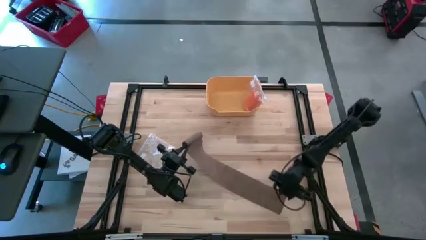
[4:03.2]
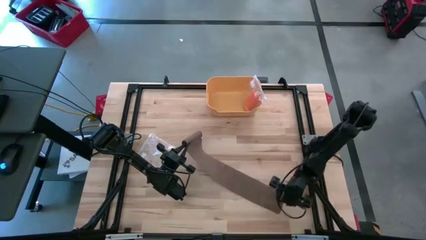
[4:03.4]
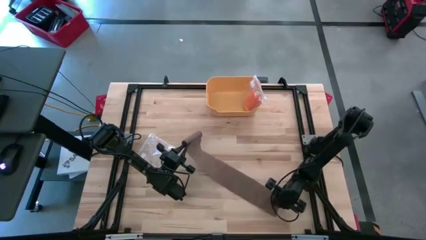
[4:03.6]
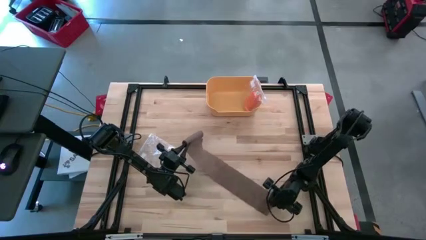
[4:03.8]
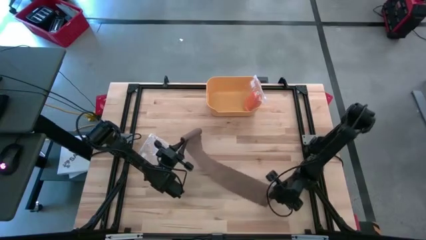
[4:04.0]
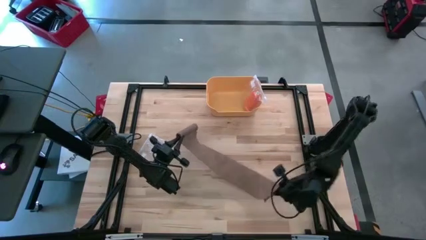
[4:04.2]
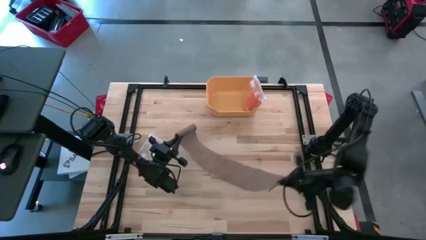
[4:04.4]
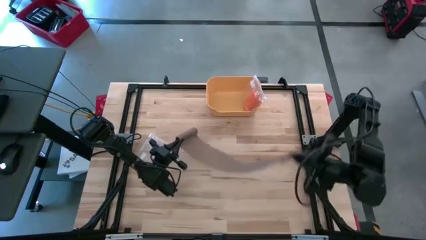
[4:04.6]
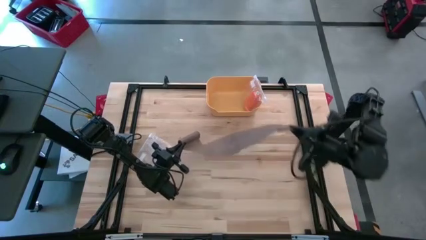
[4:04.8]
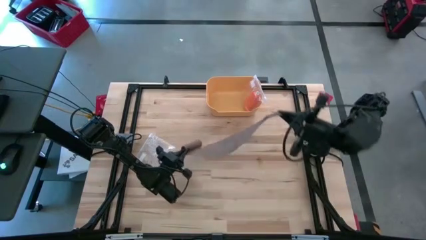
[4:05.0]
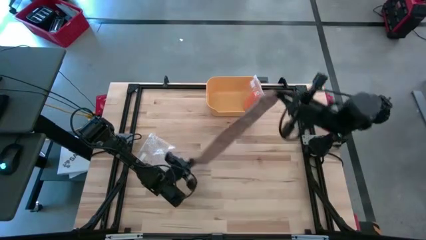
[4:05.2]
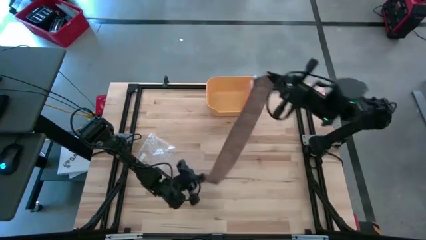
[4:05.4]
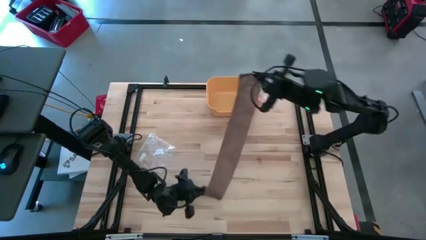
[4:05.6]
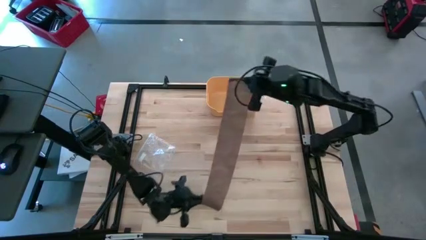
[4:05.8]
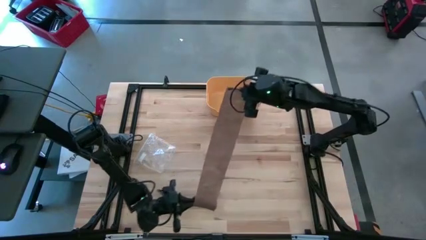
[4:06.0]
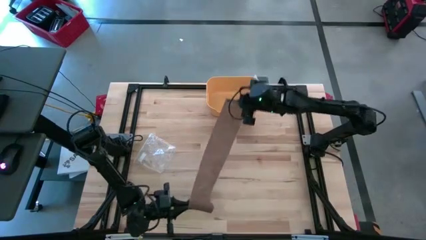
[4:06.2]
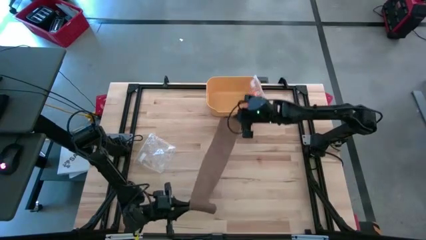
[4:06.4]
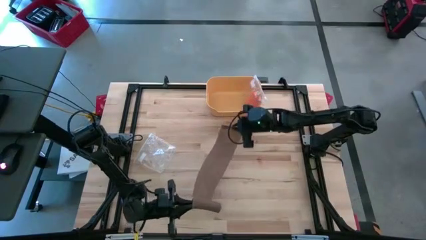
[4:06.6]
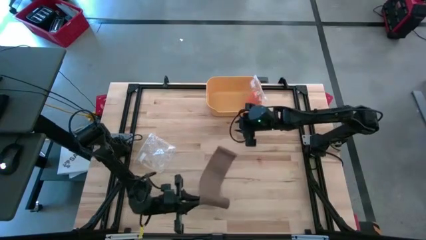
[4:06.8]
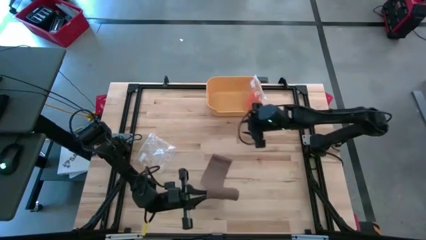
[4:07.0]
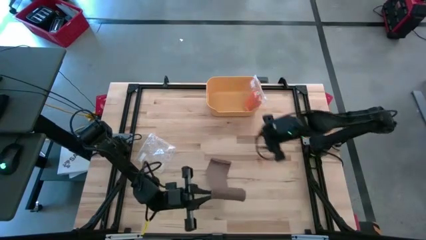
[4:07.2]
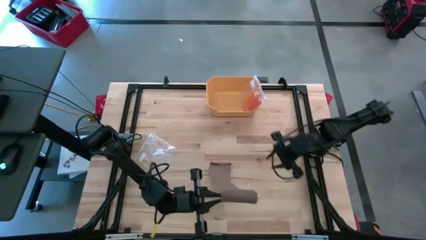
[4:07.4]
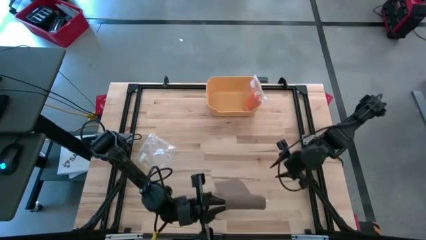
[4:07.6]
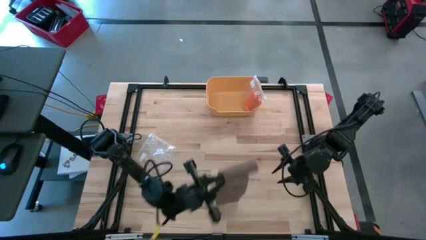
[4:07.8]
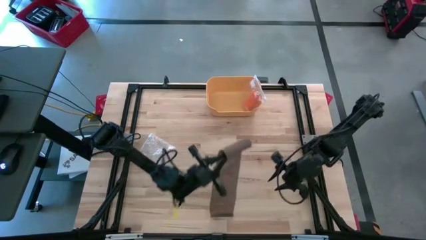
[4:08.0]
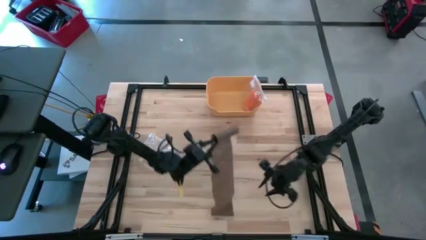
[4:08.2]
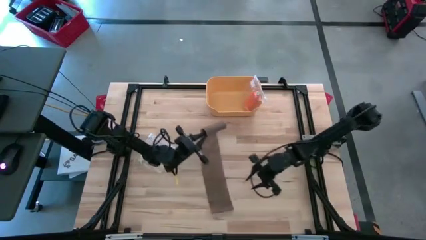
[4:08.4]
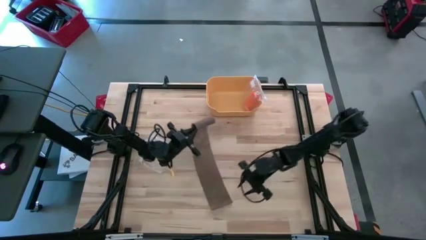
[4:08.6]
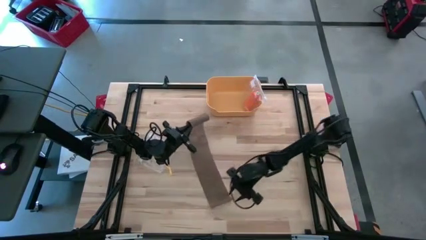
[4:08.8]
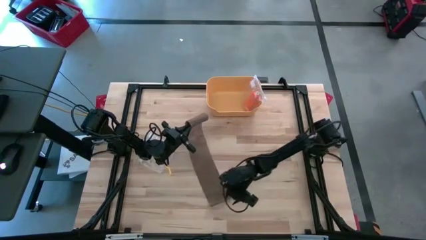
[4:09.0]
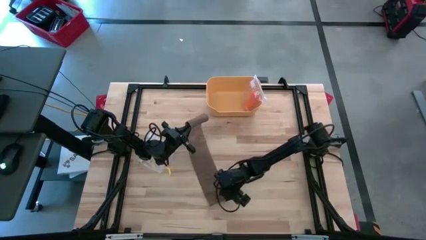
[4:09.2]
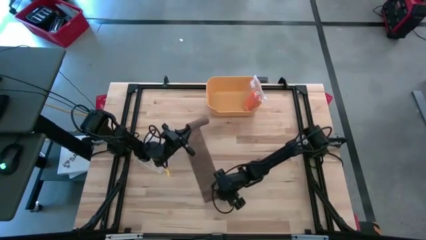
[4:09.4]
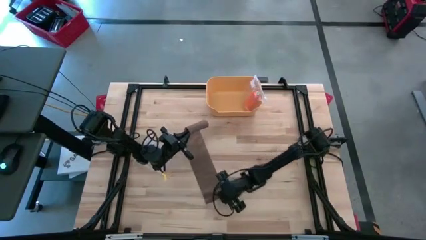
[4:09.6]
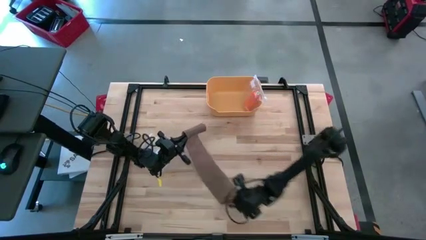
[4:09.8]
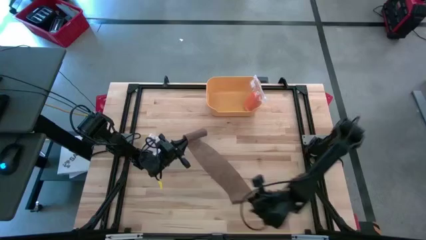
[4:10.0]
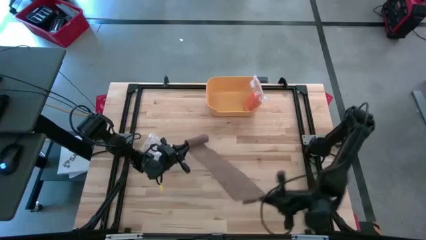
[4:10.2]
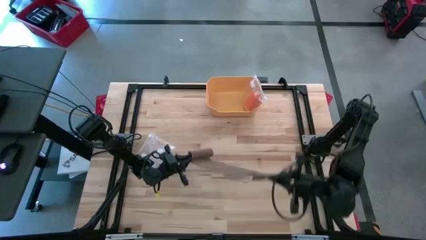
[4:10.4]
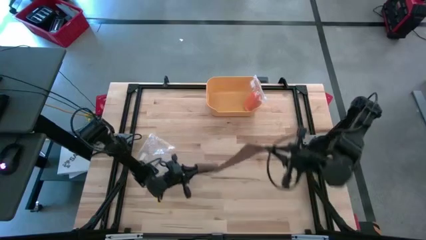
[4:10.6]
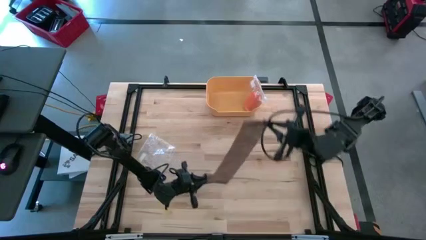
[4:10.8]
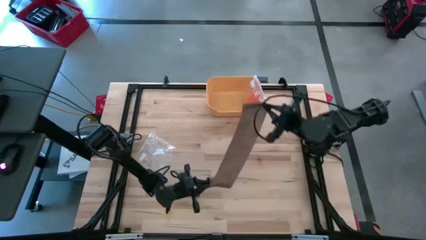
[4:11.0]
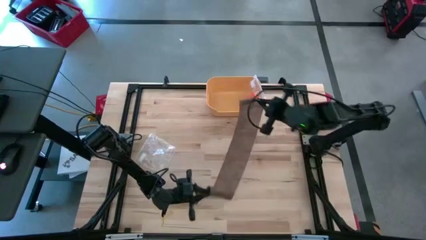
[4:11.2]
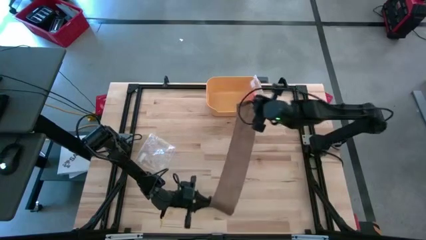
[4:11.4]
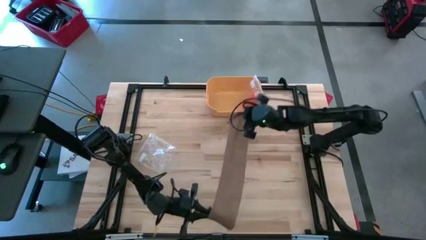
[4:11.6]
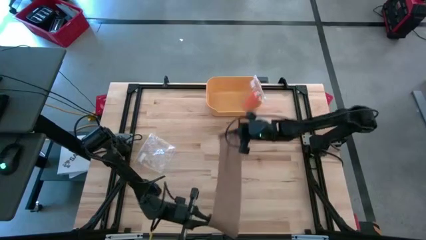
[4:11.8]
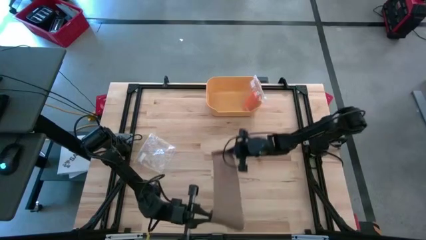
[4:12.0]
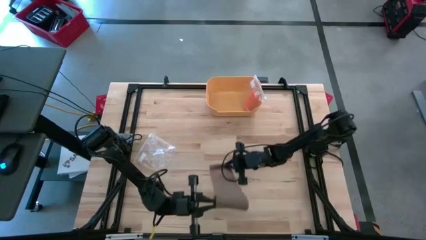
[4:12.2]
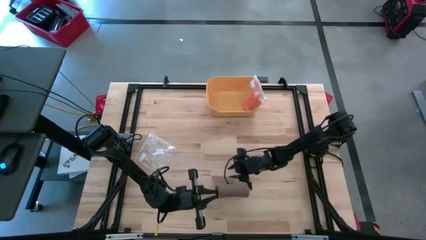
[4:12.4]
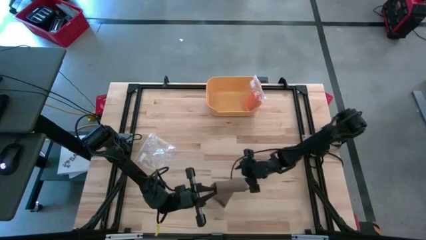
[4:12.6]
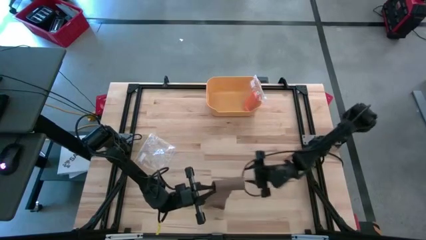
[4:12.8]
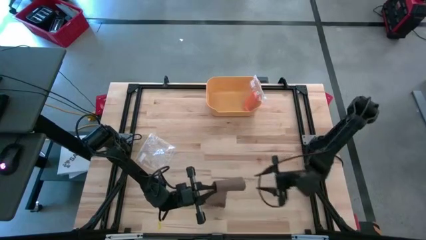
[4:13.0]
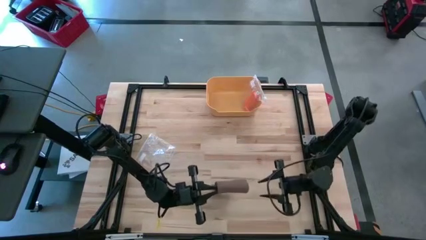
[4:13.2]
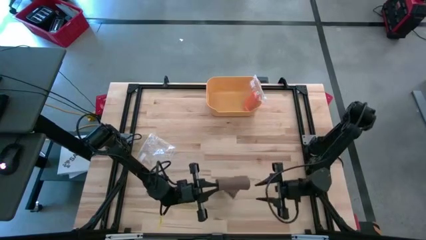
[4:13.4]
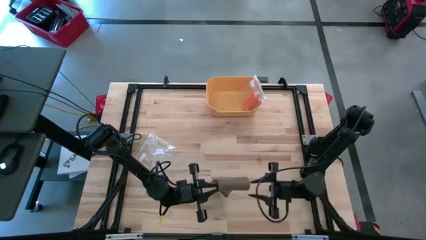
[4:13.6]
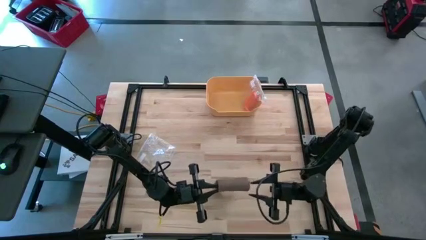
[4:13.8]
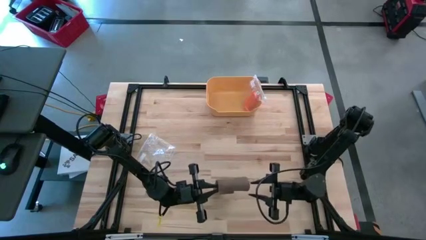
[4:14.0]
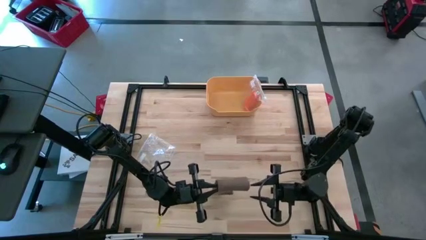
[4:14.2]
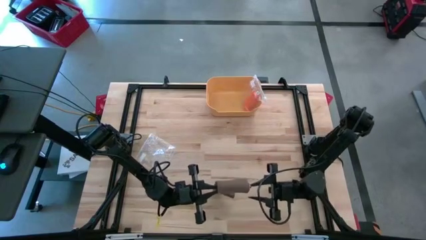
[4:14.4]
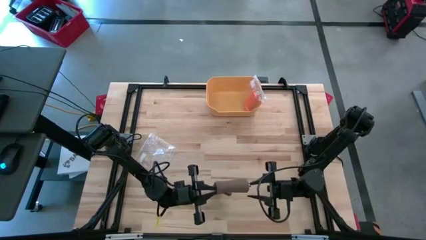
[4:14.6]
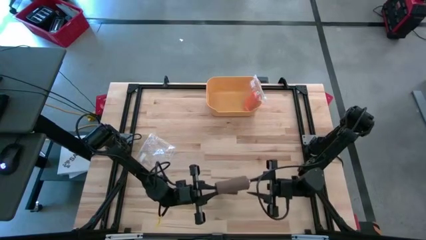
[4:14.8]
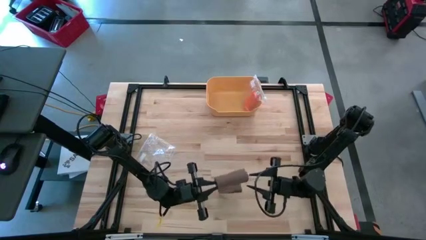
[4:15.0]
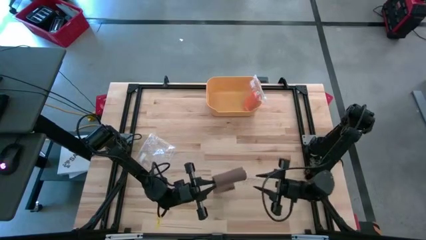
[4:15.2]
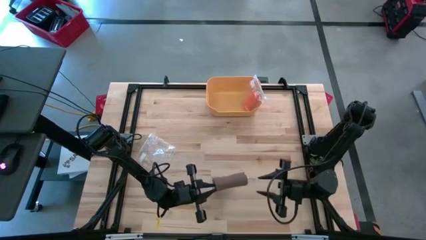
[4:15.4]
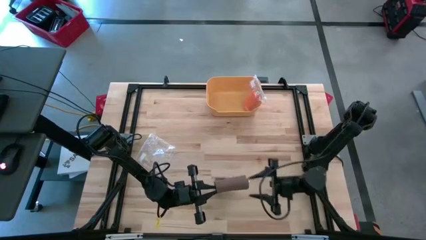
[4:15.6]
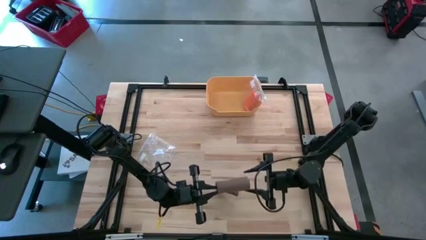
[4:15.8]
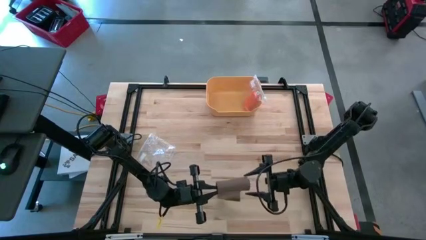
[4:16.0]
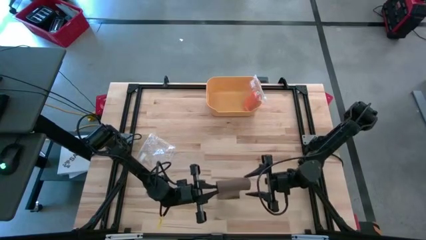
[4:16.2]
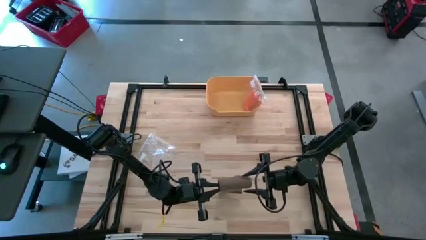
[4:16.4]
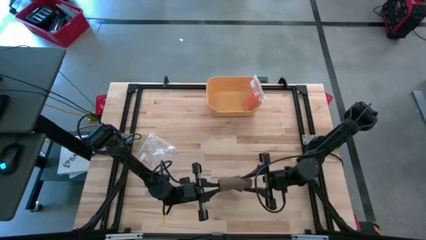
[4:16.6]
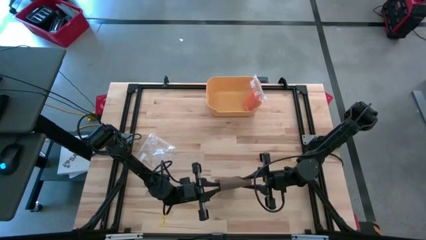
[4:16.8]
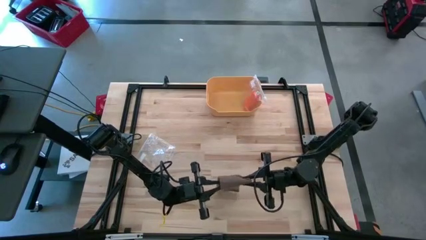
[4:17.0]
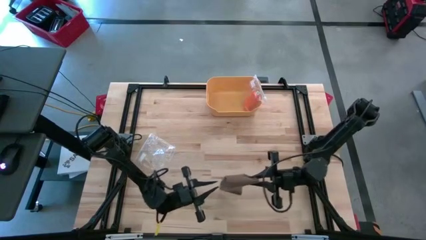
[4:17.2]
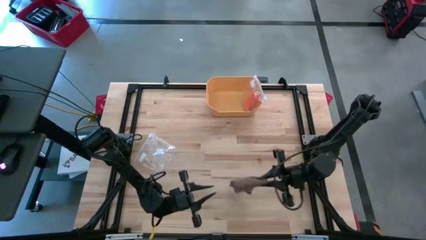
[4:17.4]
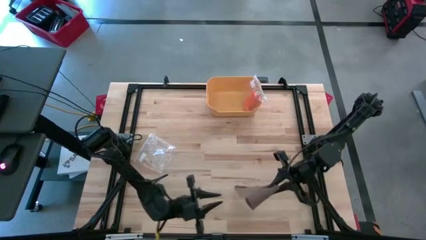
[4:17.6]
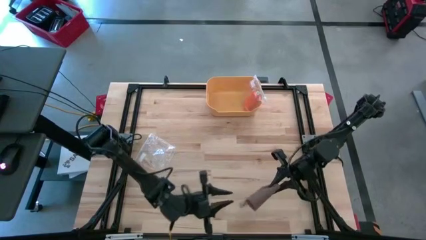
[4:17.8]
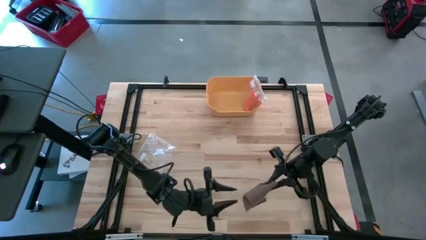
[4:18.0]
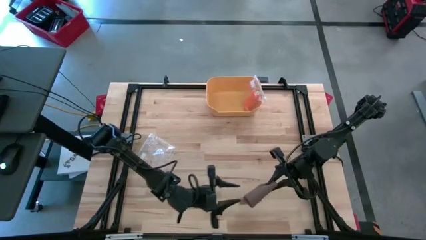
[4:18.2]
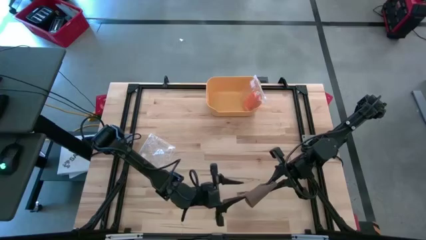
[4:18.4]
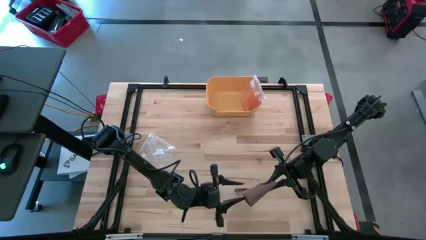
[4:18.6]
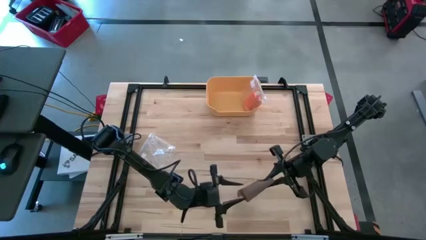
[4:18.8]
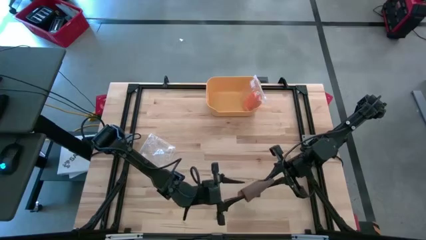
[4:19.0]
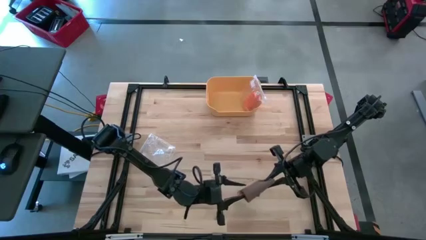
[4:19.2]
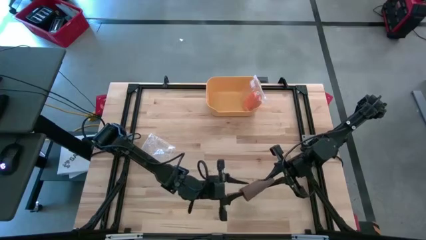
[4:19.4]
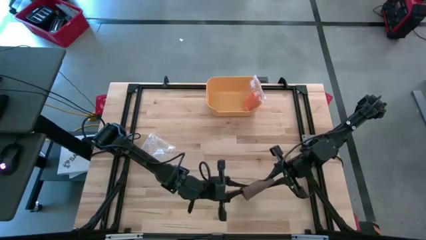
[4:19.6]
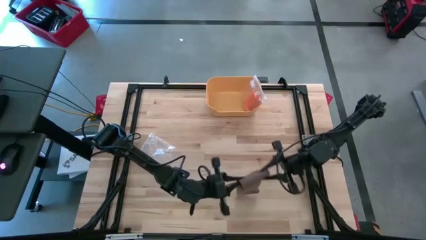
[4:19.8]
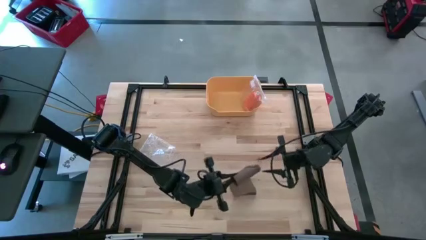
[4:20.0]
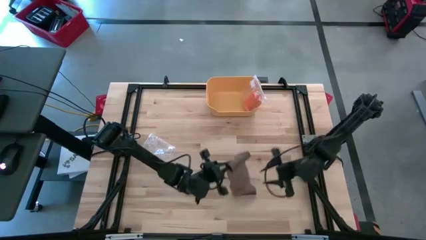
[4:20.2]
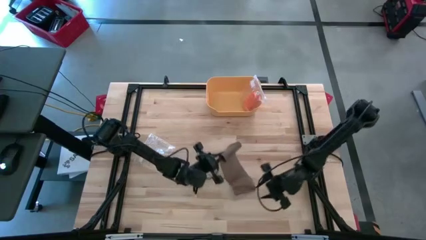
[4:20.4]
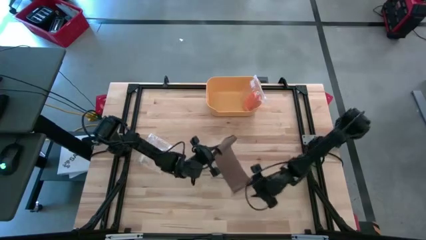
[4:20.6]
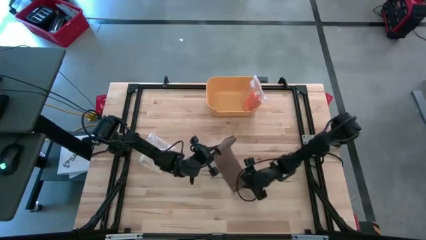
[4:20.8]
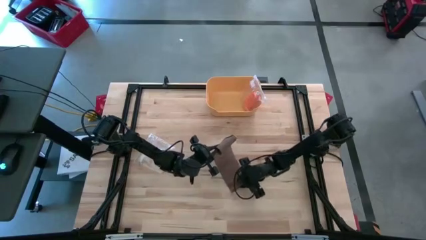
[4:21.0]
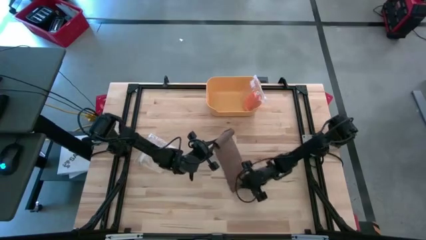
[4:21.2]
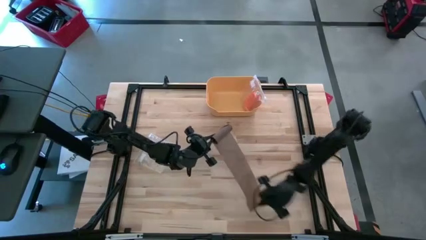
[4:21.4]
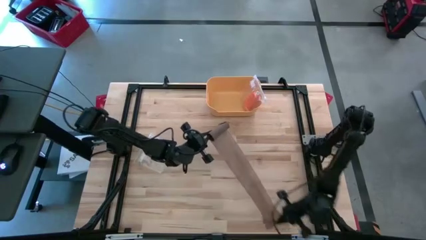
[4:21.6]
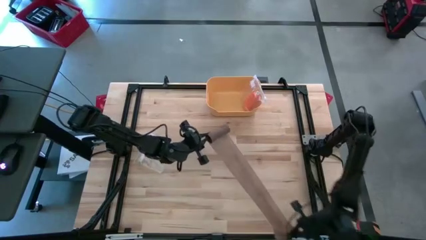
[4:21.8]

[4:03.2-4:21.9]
Task: Roll bandage
Roll the brown bandage
